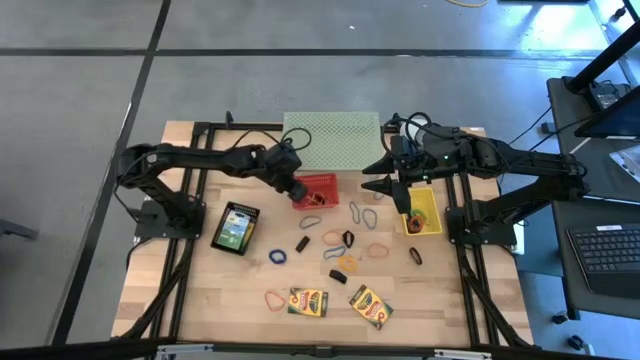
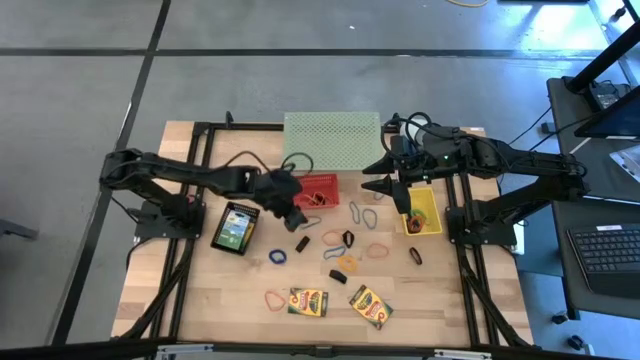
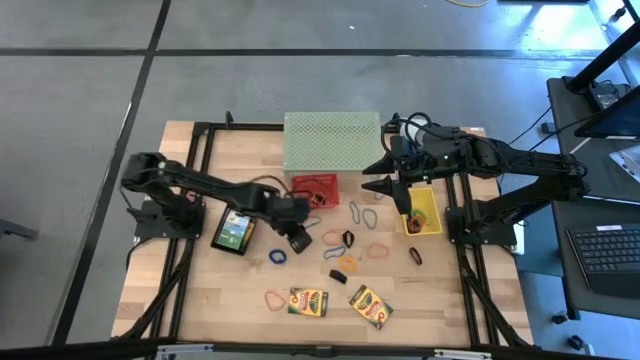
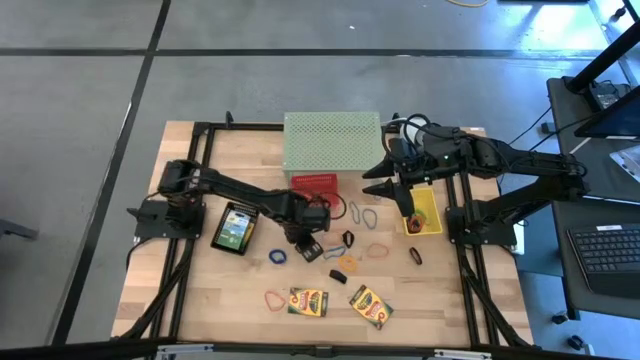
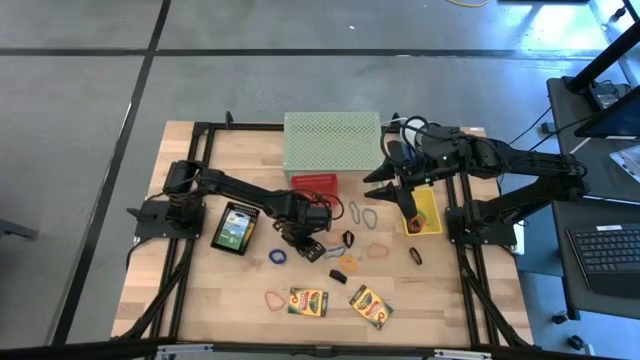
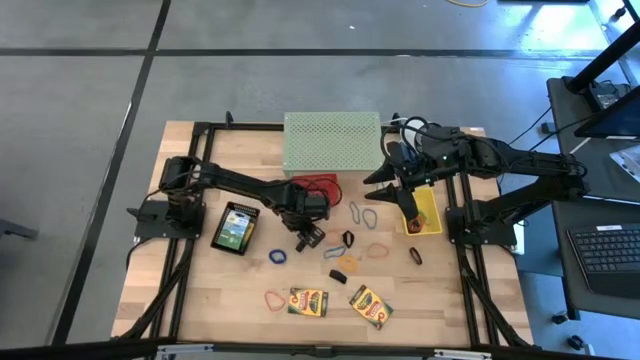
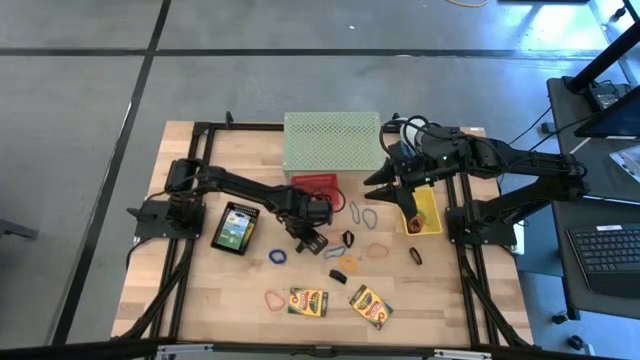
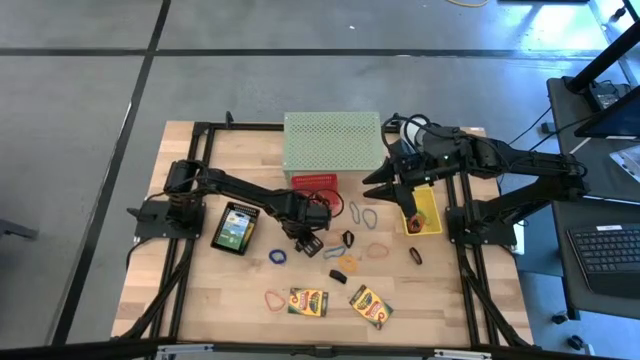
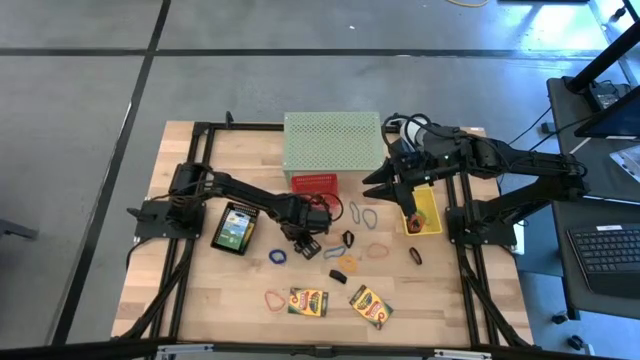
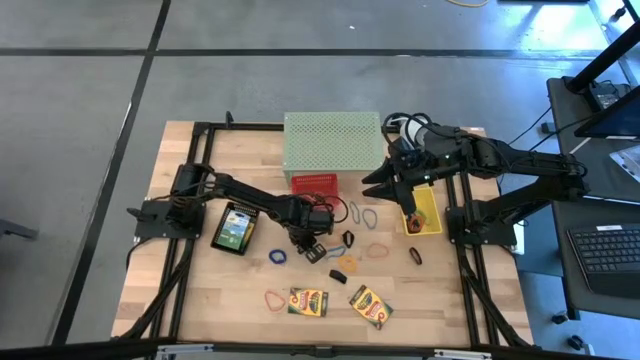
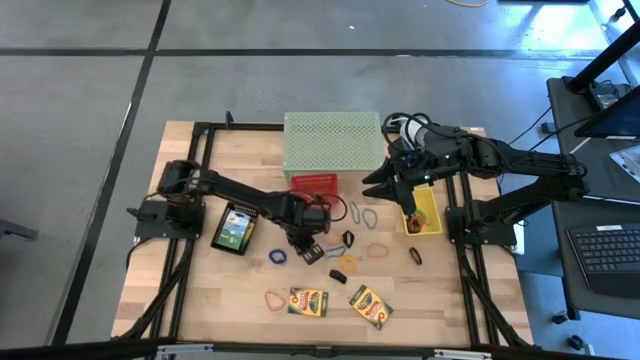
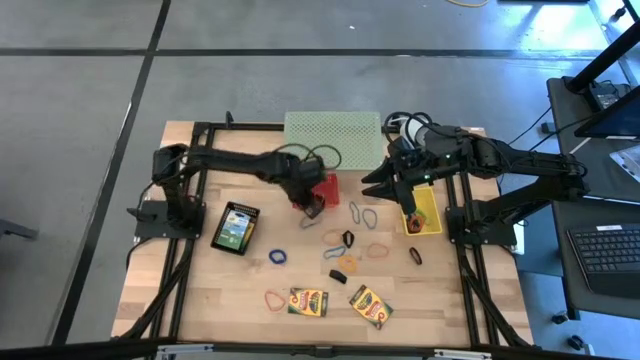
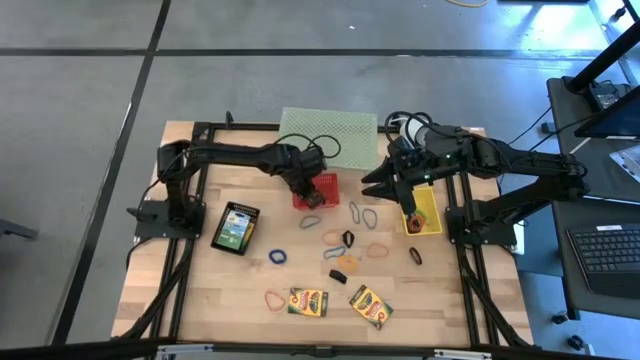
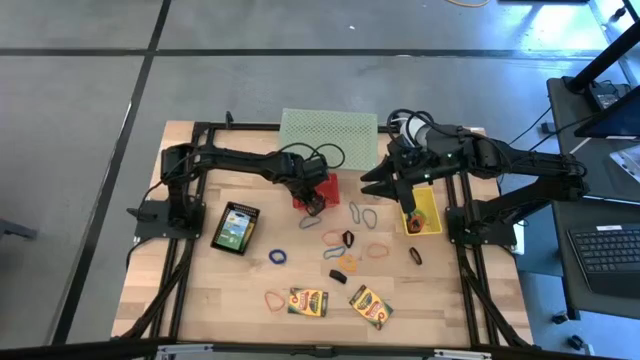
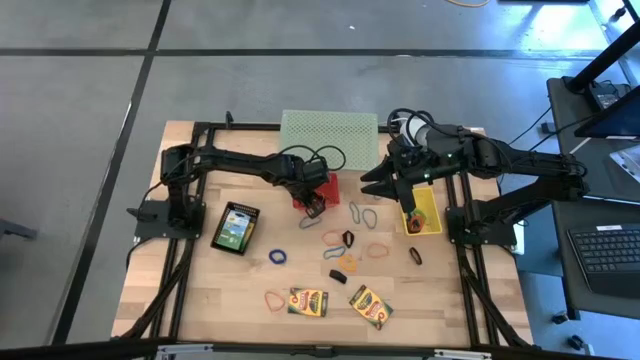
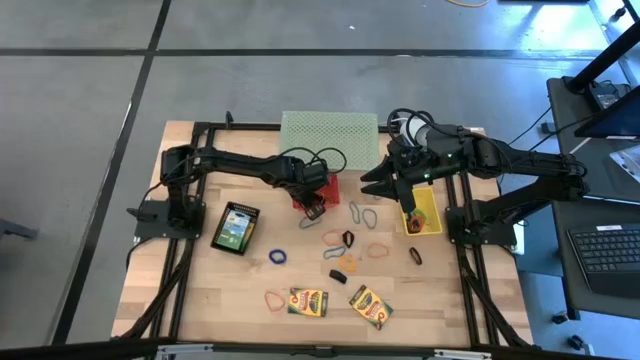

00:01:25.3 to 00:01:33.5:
Task: Pick & Place Office Desk Supplies
Put the black rubber band into the red bin

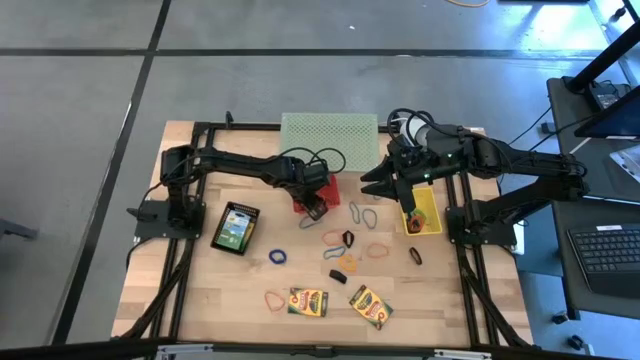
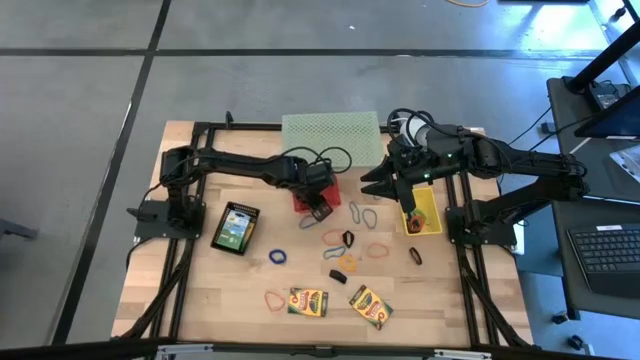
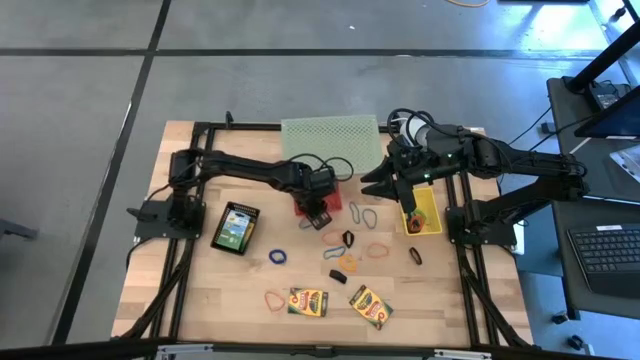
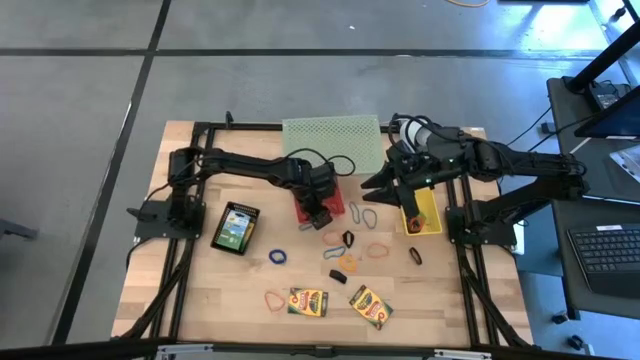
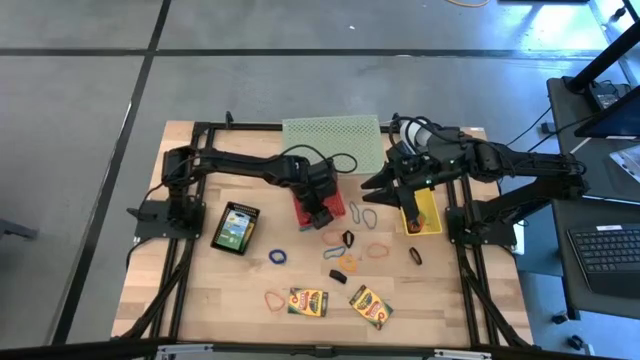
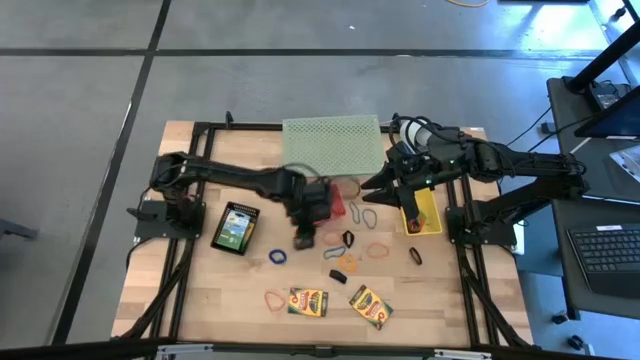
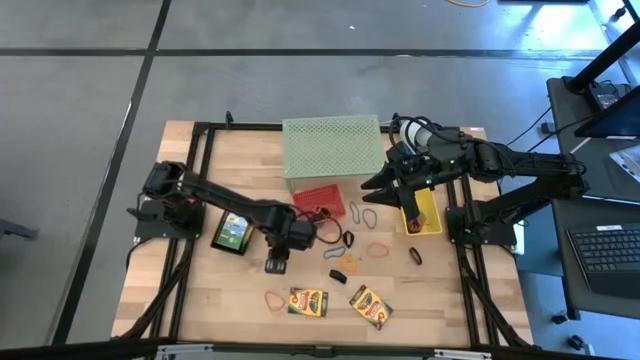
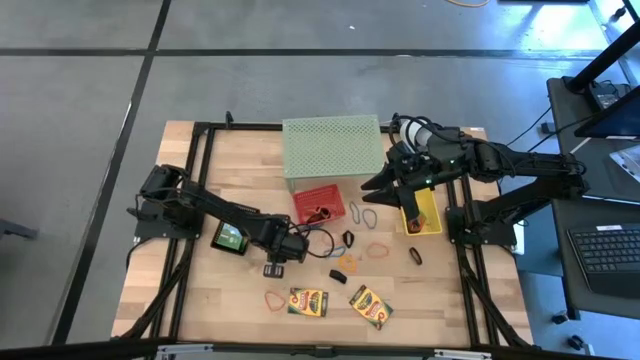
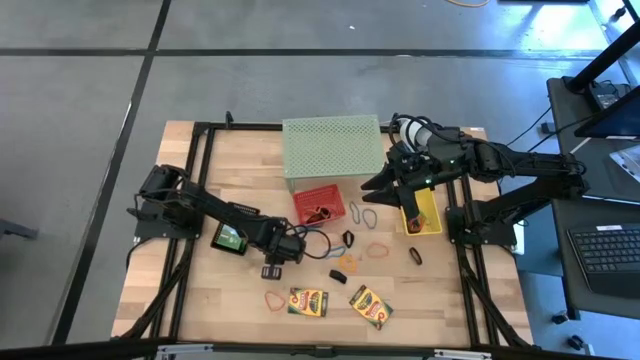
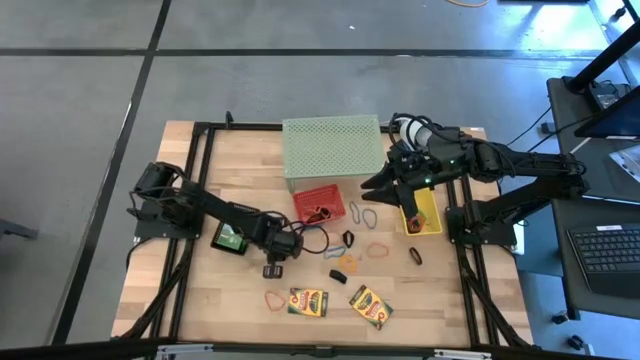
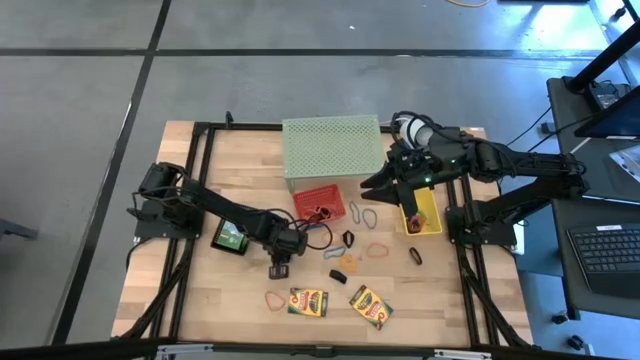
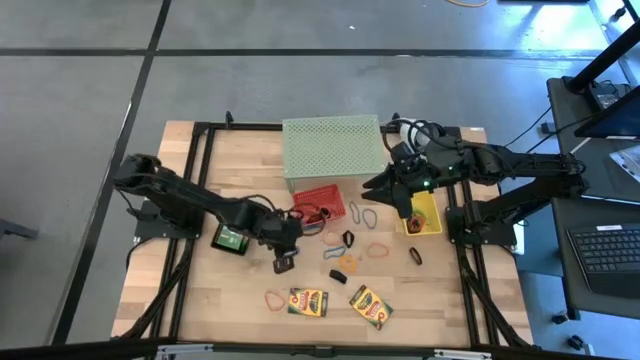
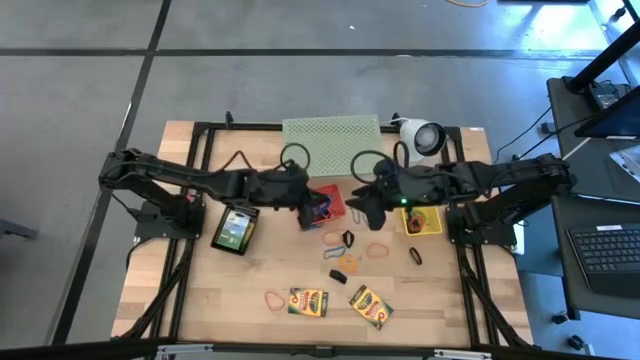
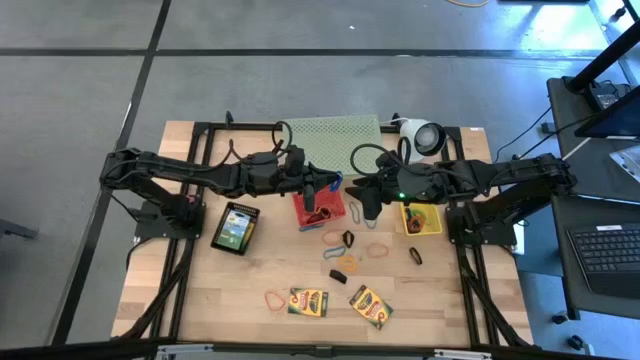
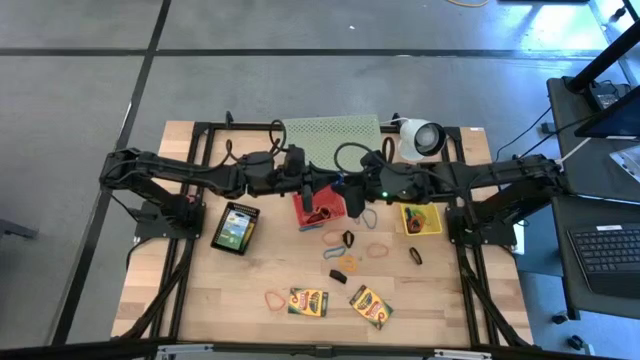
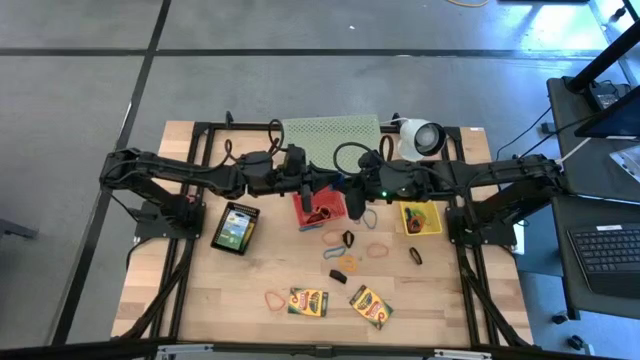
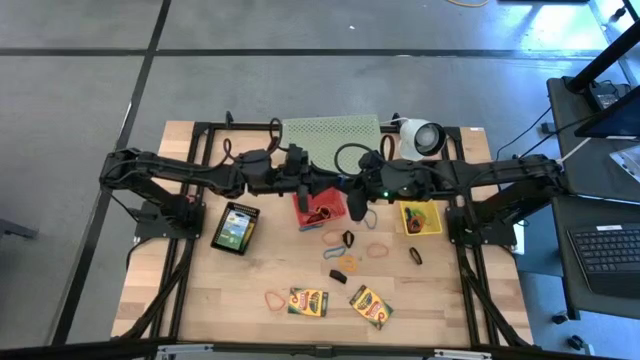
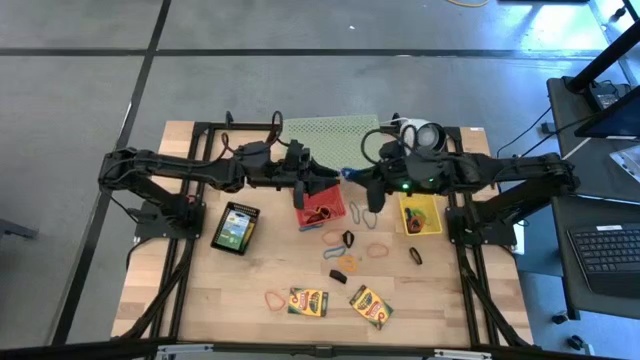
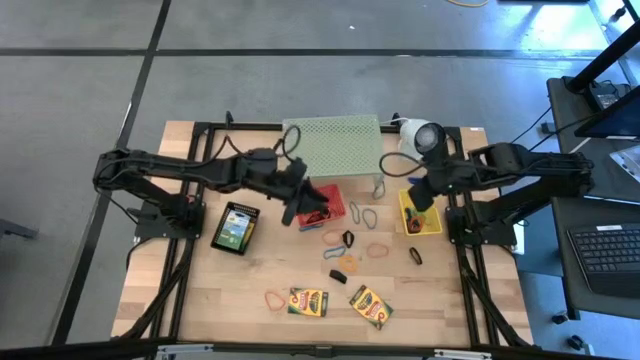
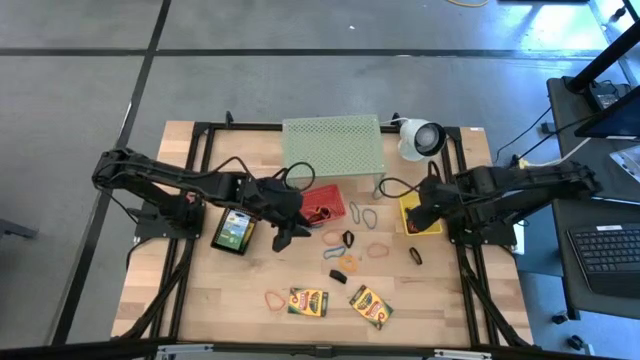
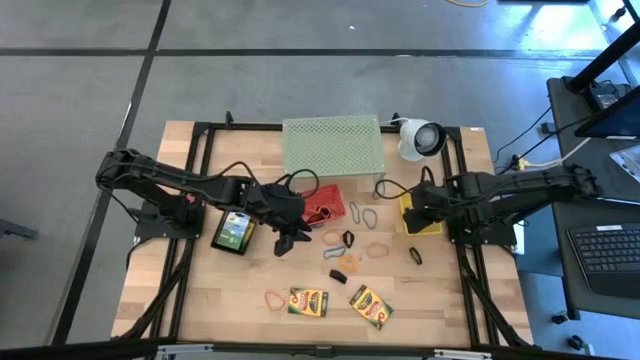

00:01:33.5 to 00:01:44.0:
Put the blue spring keychain into the yellow bin

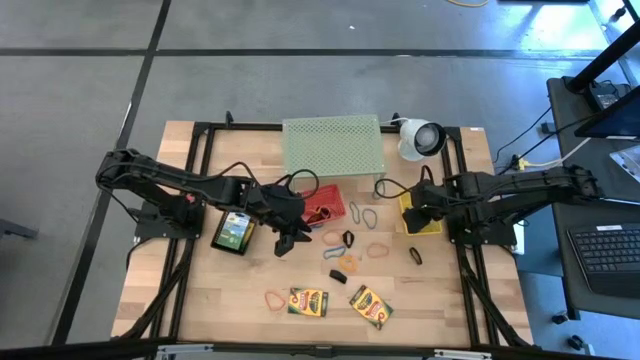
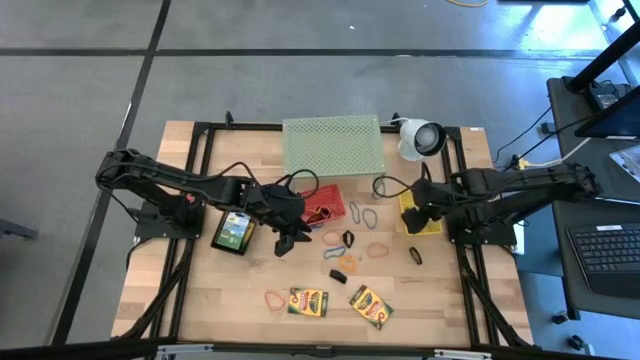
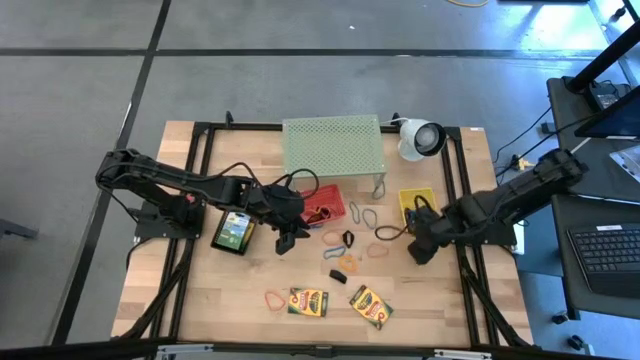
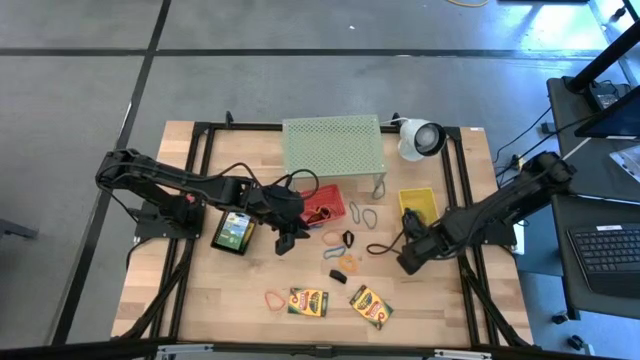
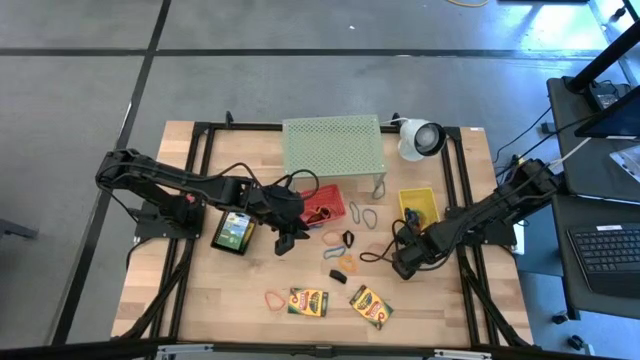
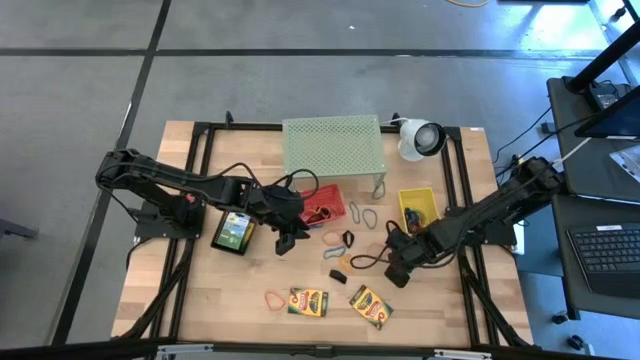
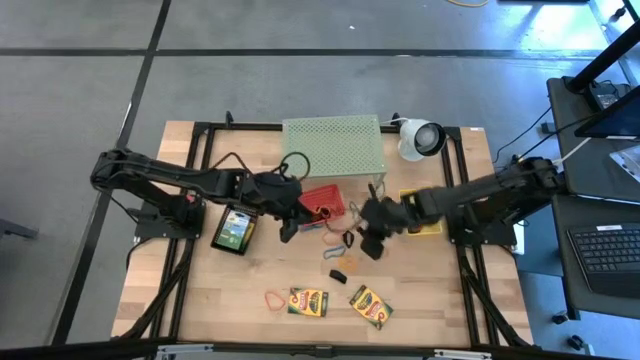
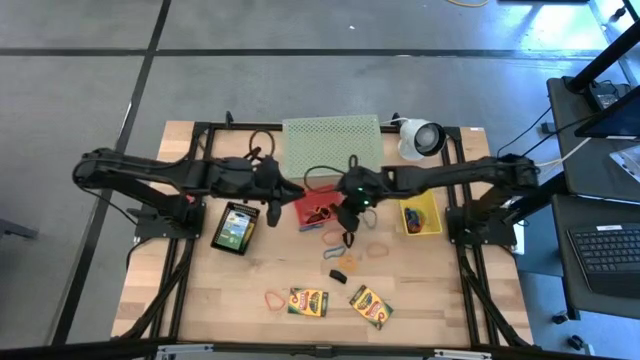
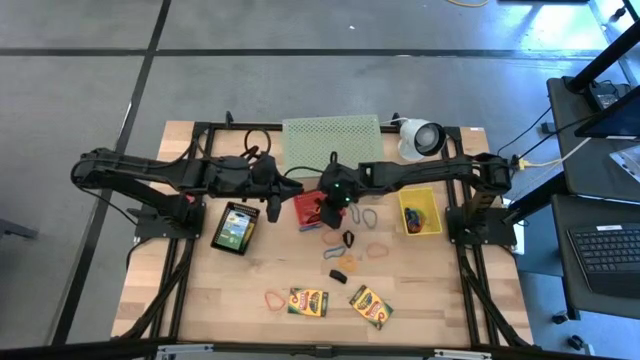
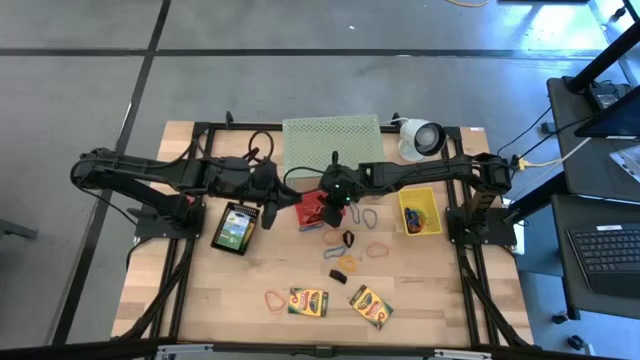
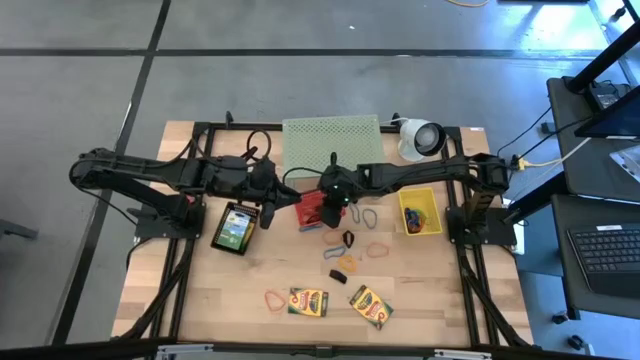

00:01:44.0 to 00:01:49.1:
Put the black rubber band into the red bin
